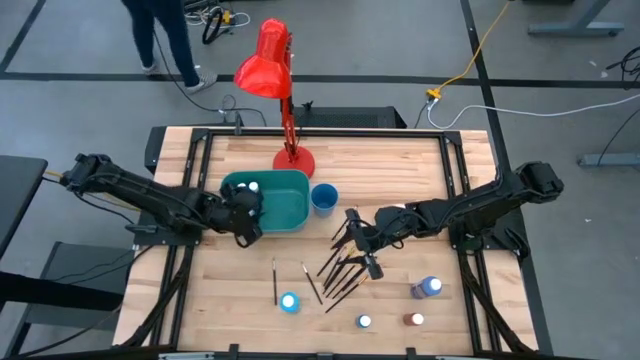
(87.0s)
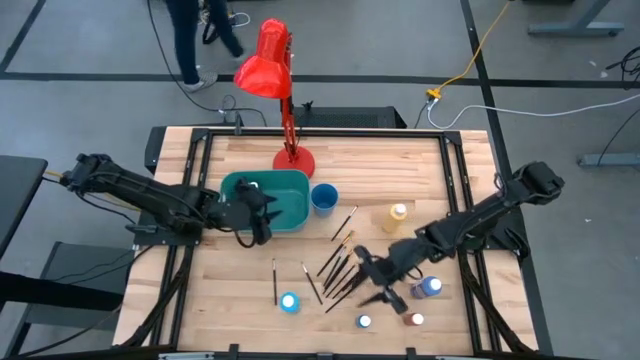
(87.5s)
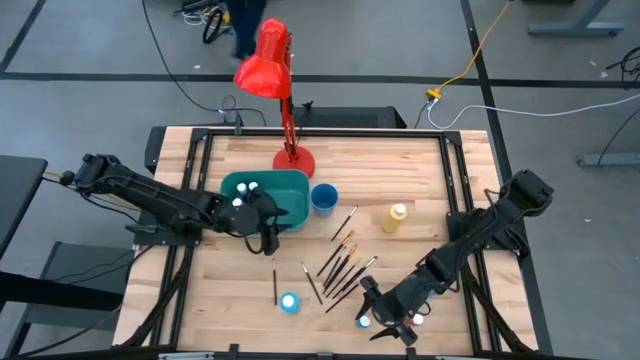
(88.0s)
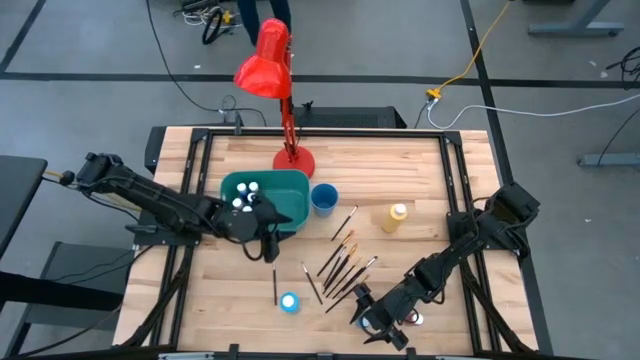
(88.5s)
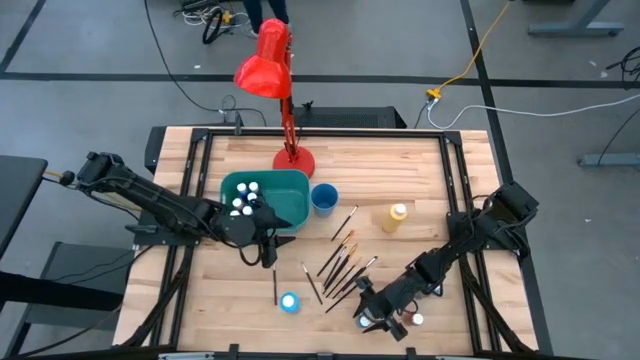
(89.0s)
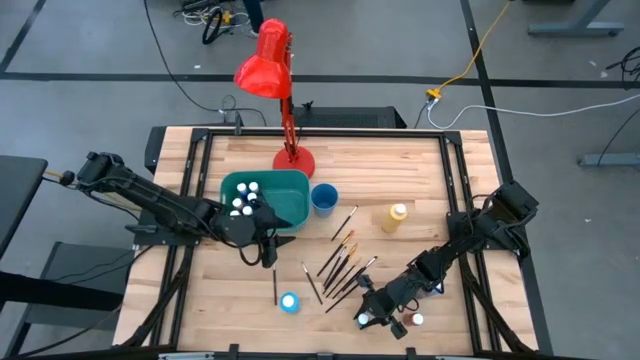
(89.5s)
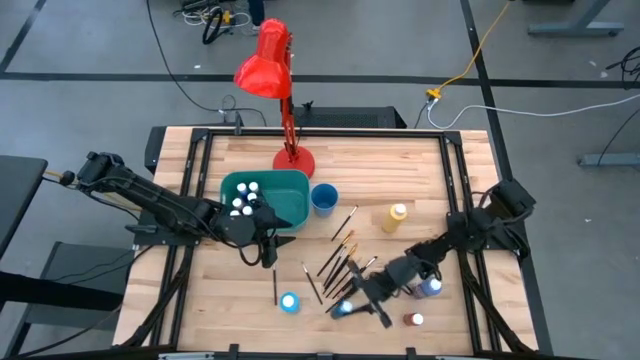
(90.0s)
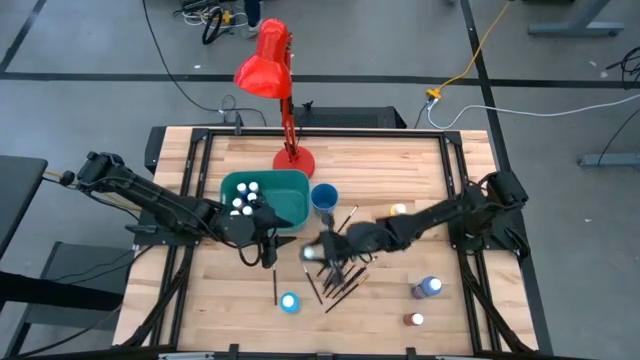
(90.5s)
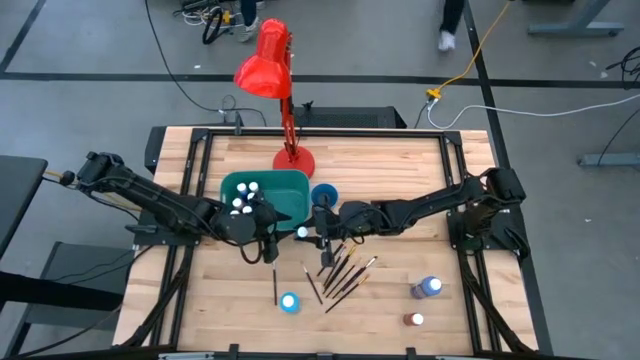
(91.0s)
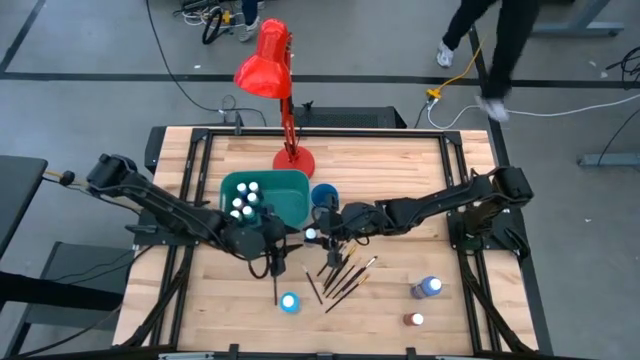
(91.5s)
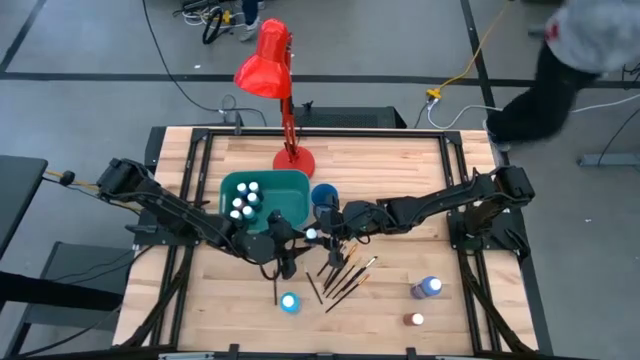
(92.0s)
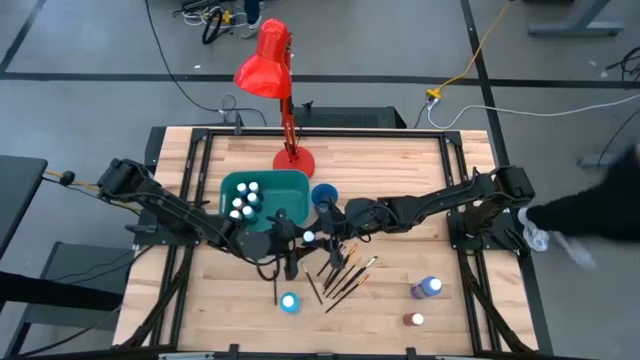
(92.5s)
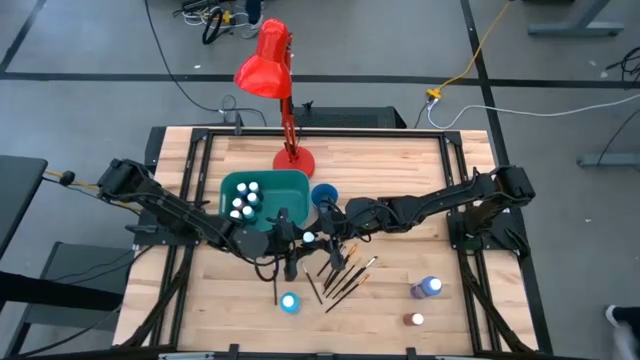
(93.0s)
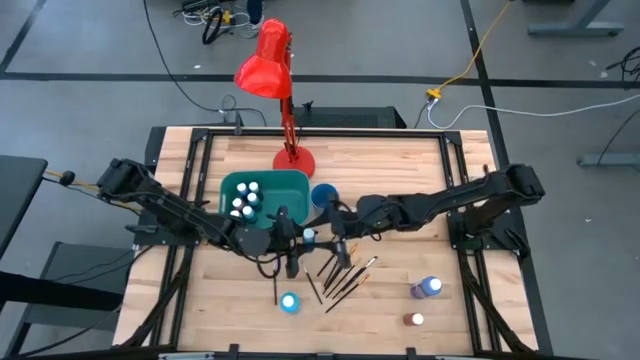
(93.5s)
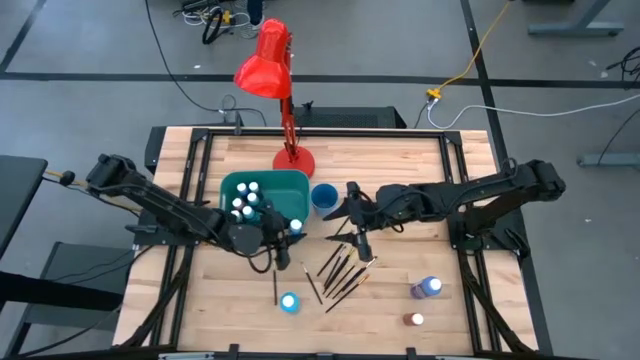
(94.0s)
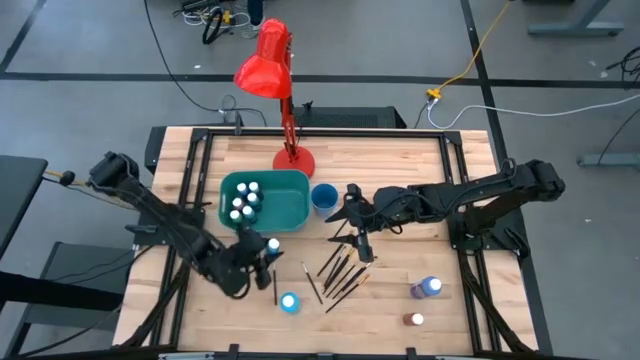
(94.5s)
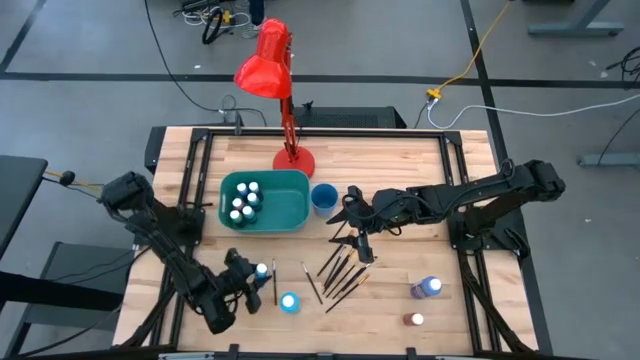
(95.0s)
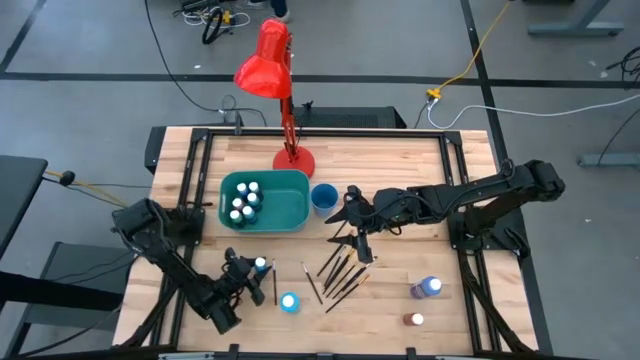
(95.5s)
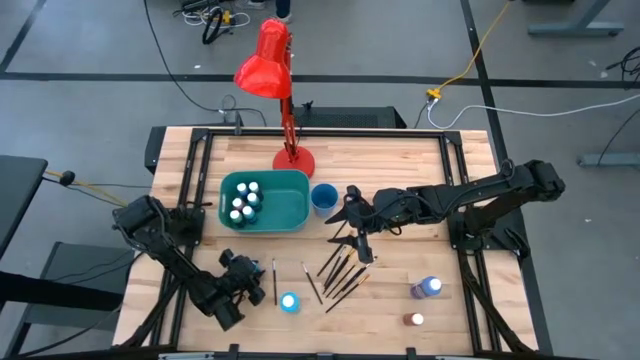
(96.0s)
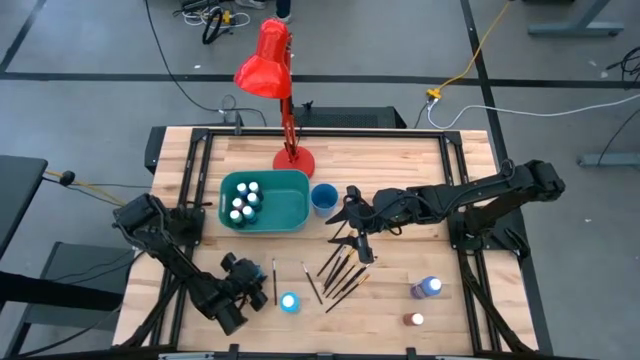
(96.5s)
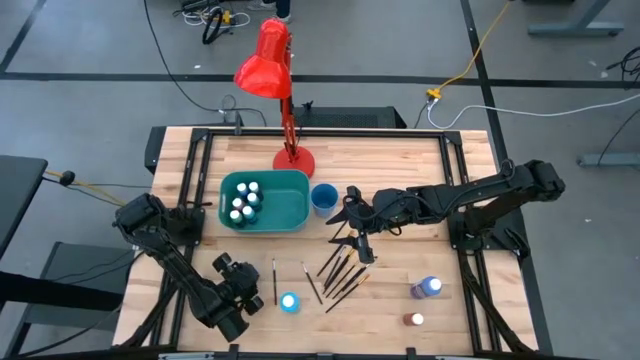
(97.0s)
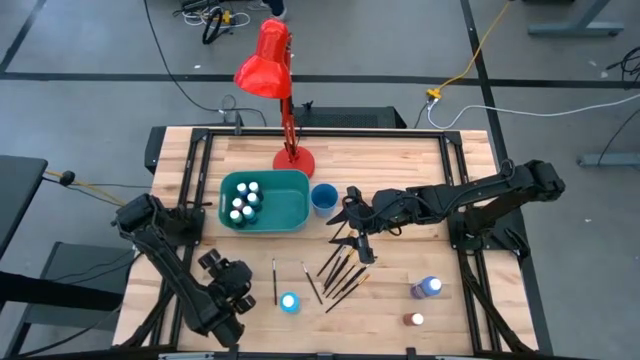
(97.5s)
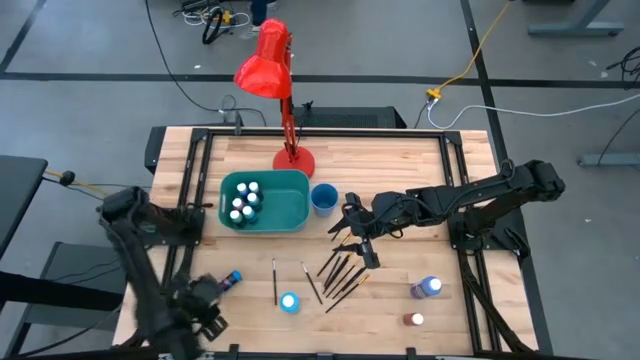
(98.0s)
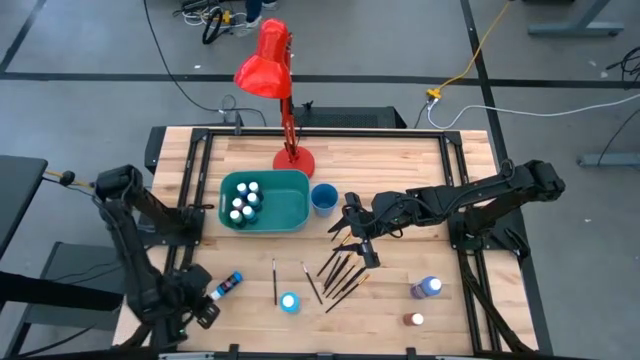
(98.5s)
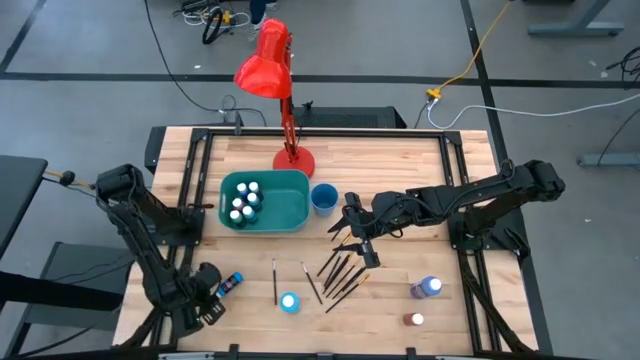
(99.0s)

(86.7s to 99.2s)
Task: Pick & Place Paint Supplies
Put the light blue paint bottle into the green bin

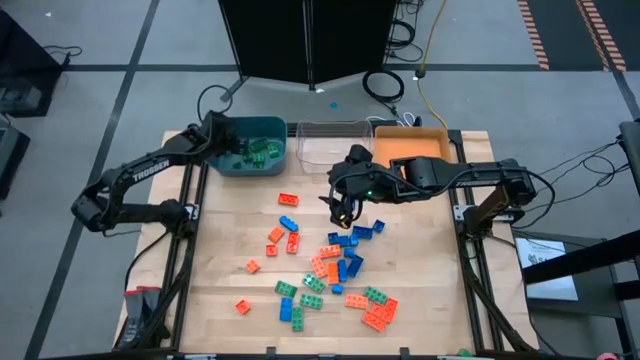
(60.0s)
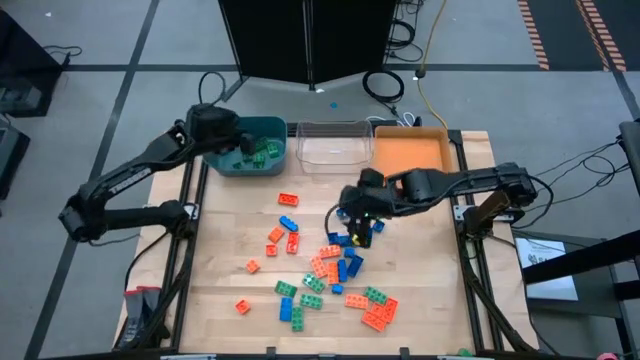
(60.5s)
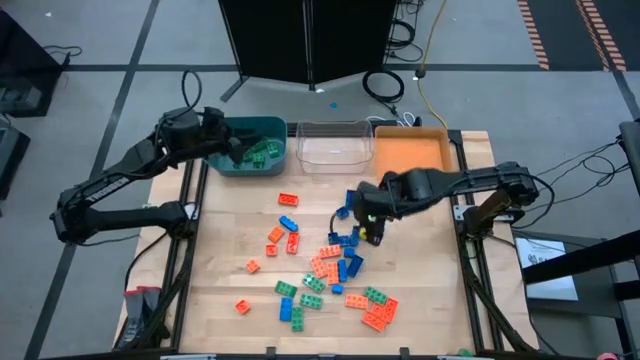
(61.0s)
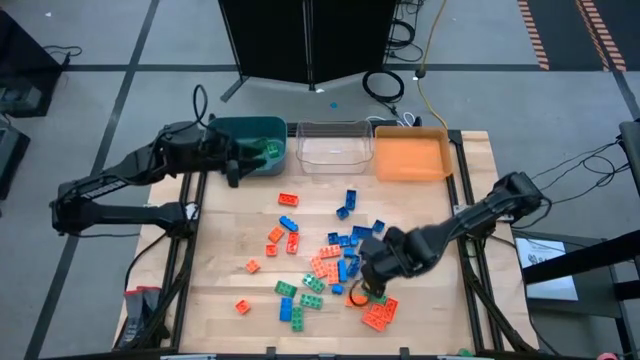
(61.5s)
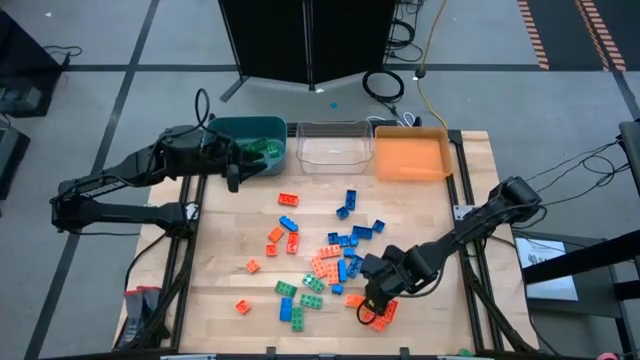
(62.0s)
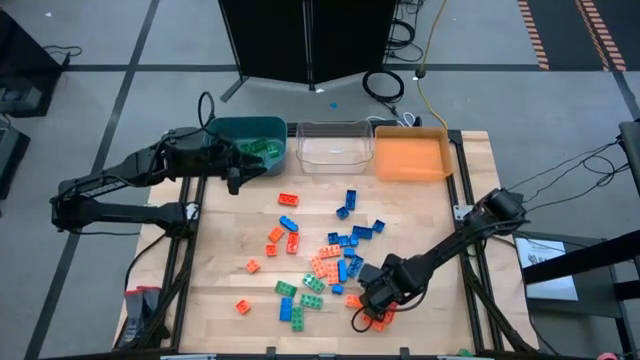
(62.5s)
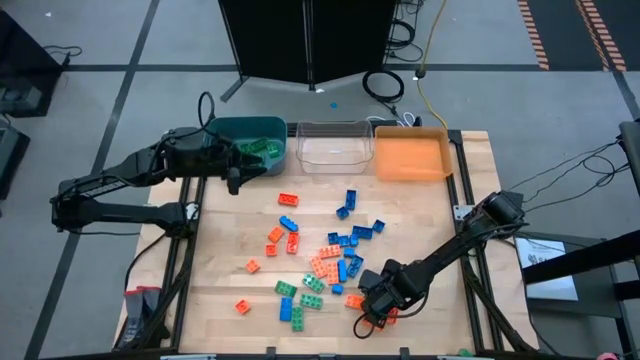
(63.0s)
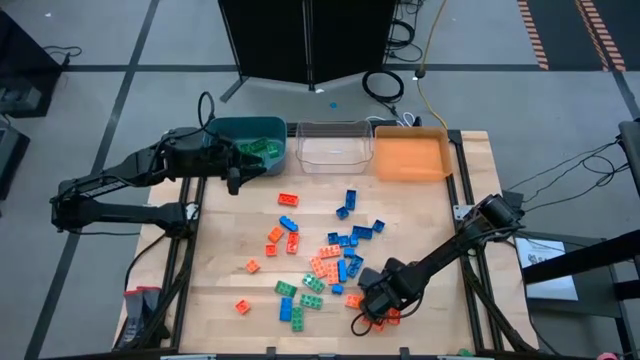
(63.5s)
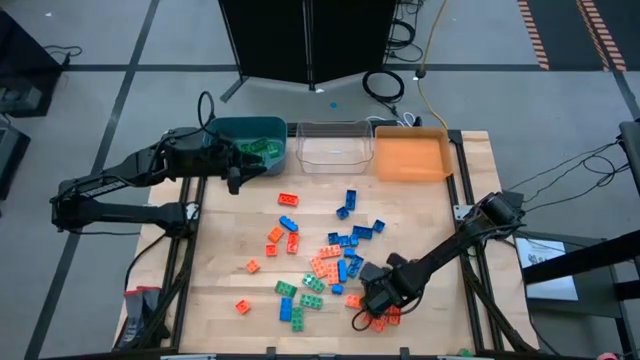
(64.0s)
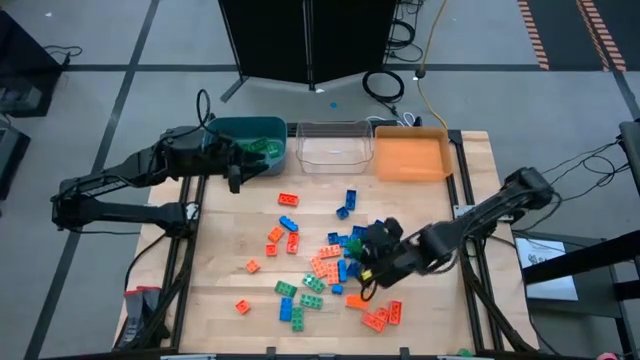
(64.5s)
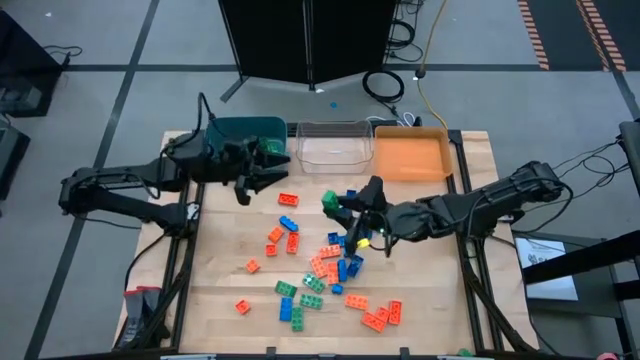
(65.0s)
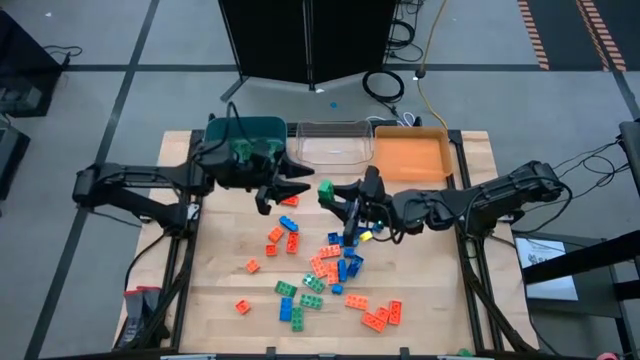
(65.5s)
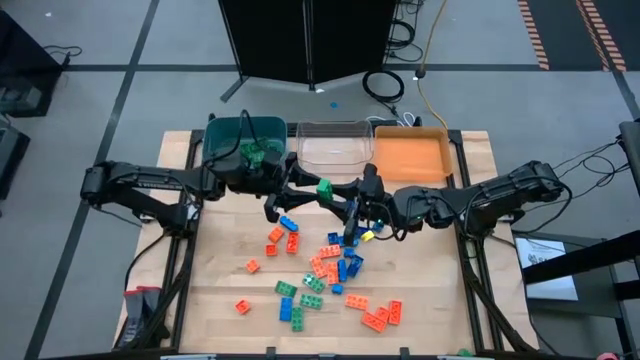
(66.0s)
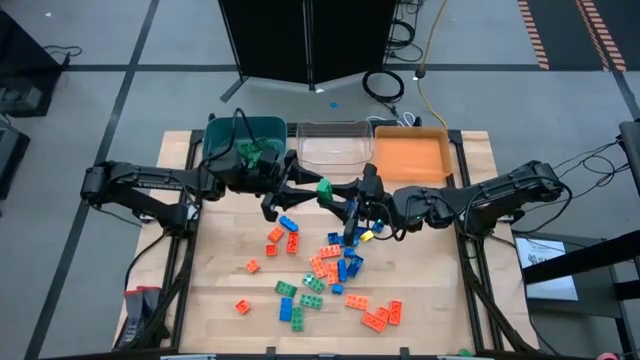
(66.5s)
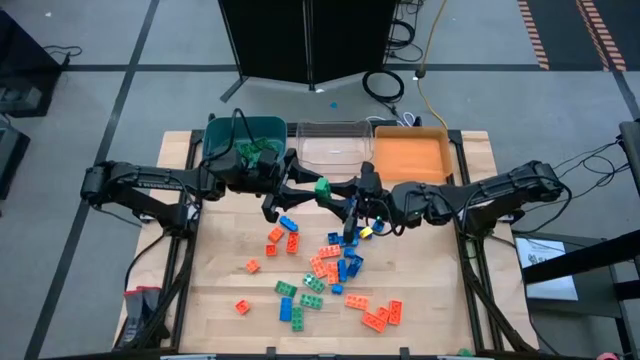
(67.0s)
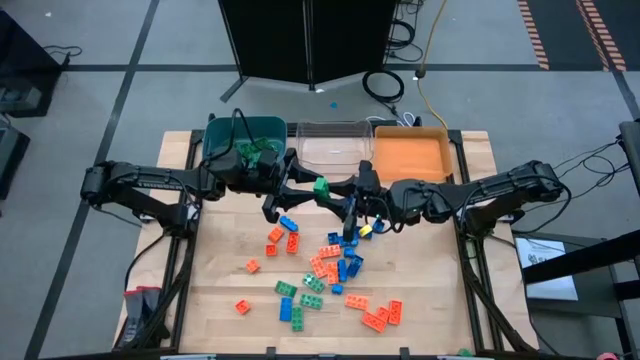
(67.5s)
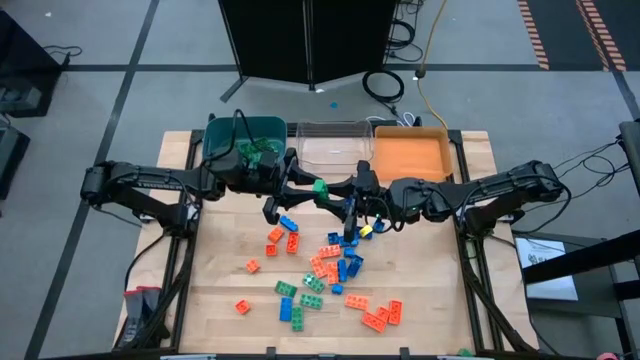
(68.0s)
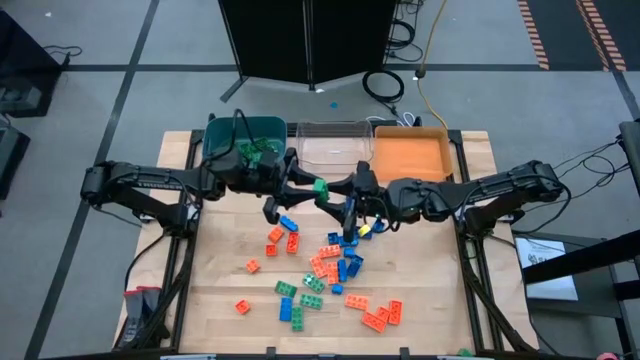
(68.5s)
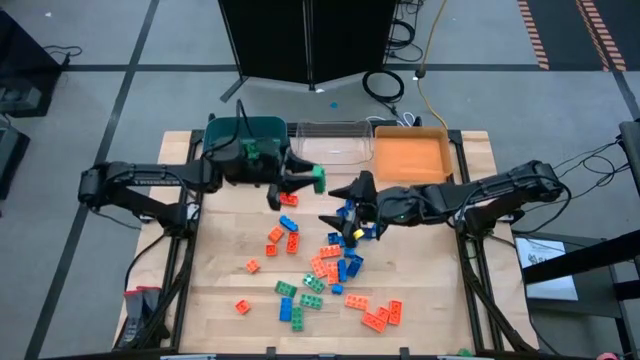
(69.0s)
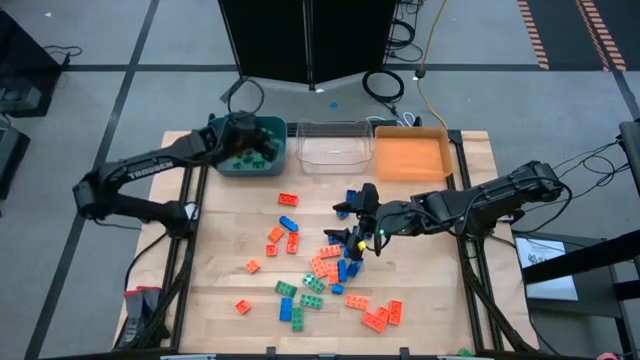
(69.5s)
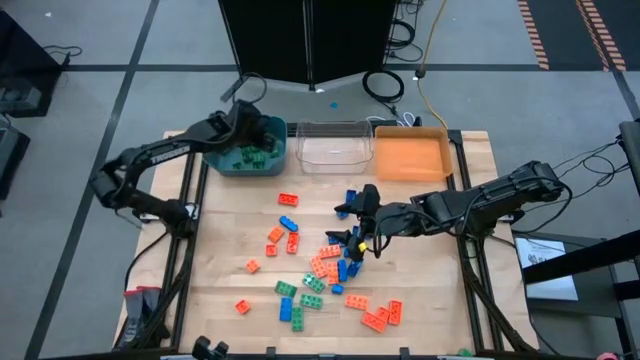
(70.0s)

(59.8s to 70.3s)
Task: Sort blocks
Put the green game piece into the blue bin
